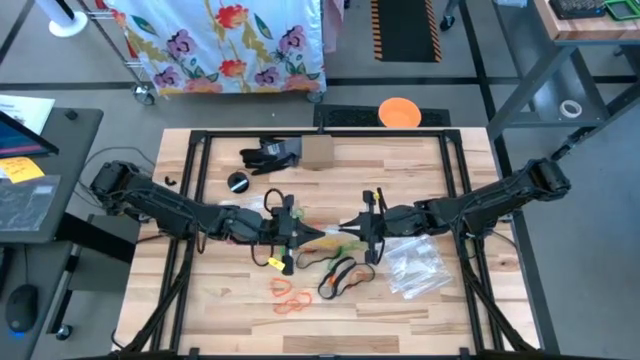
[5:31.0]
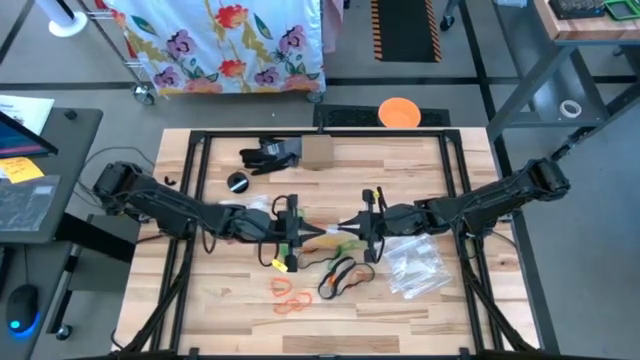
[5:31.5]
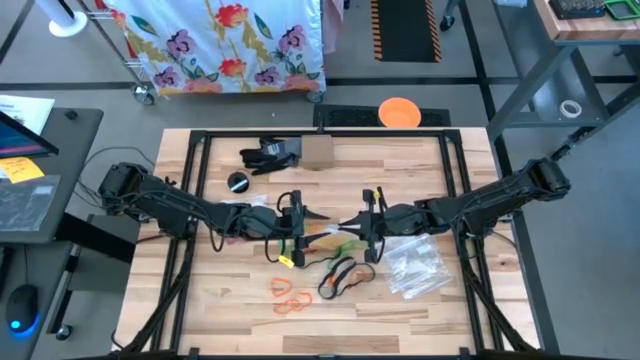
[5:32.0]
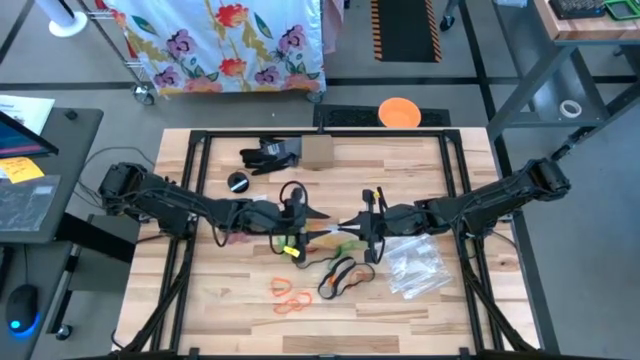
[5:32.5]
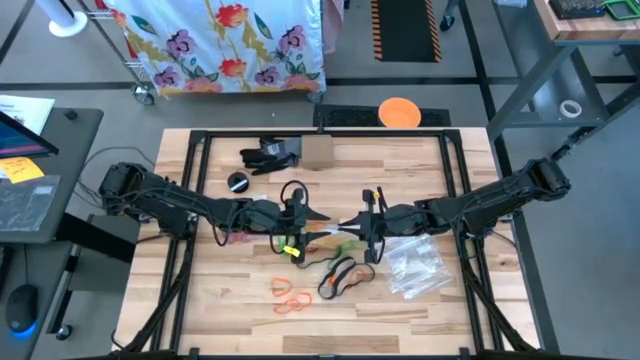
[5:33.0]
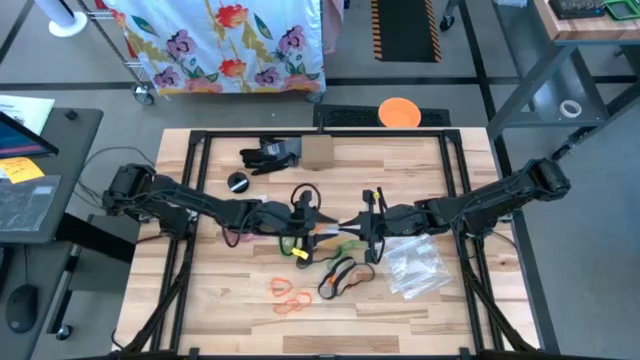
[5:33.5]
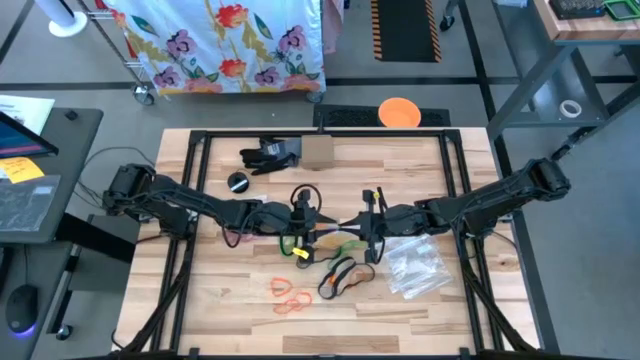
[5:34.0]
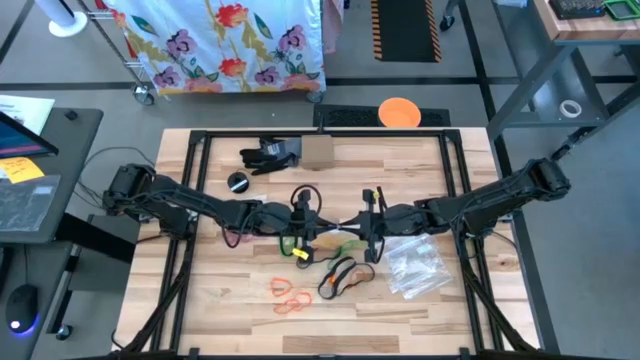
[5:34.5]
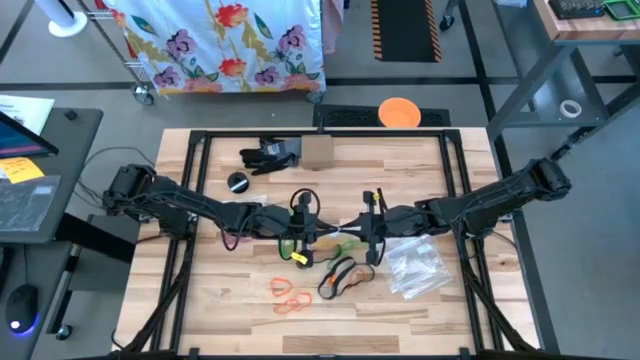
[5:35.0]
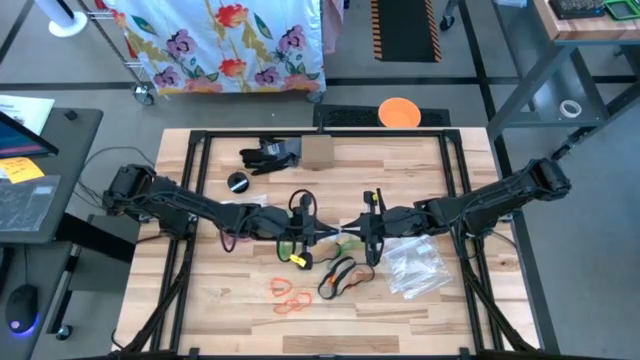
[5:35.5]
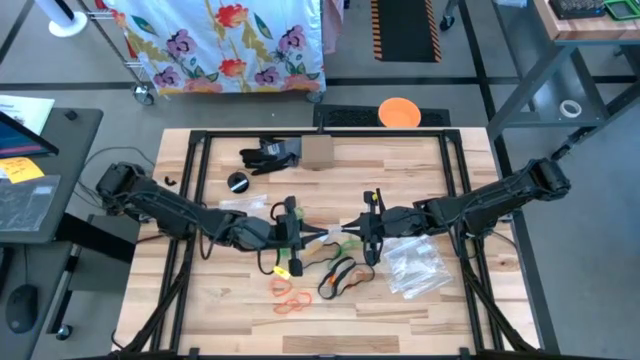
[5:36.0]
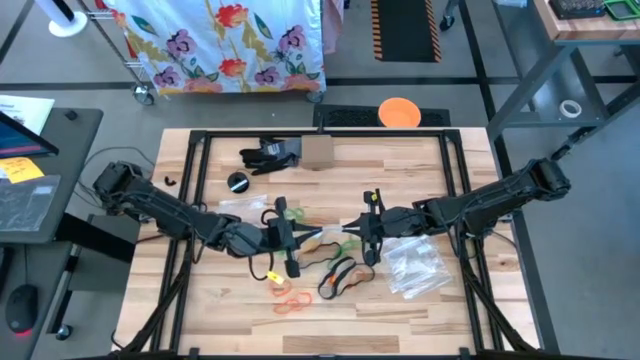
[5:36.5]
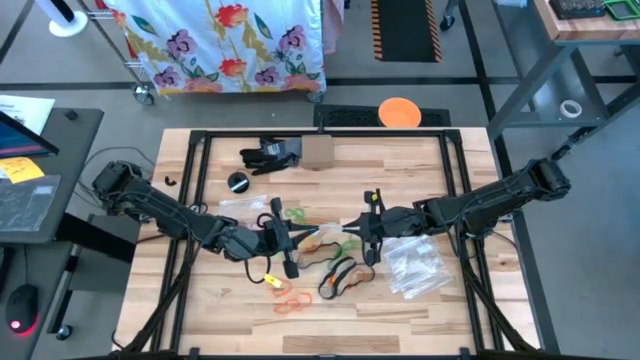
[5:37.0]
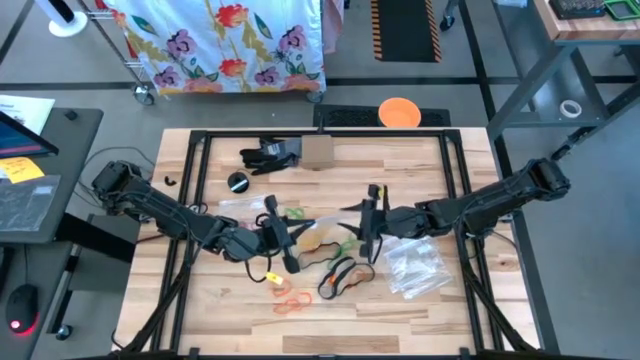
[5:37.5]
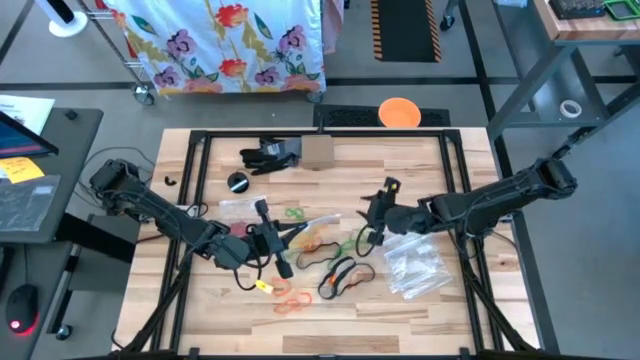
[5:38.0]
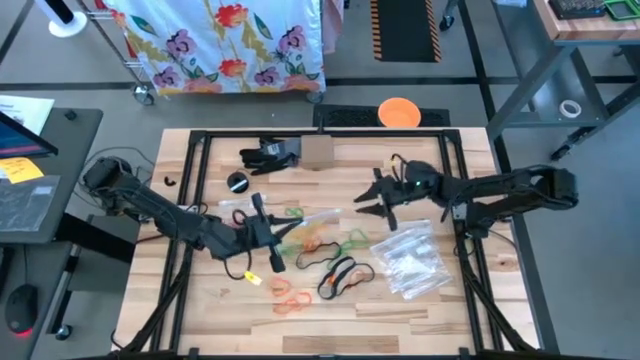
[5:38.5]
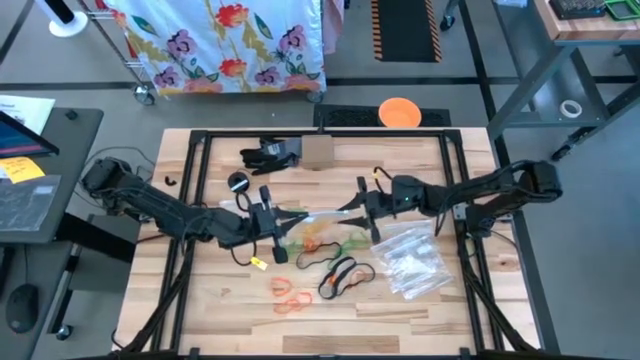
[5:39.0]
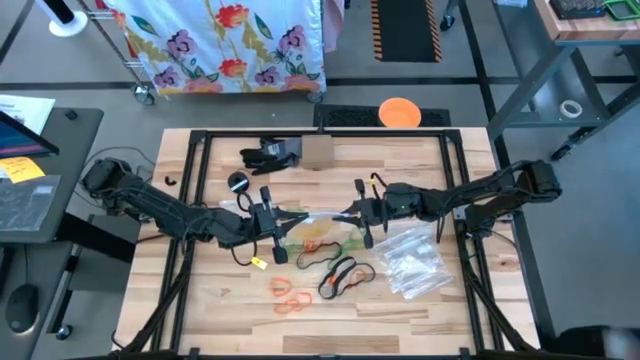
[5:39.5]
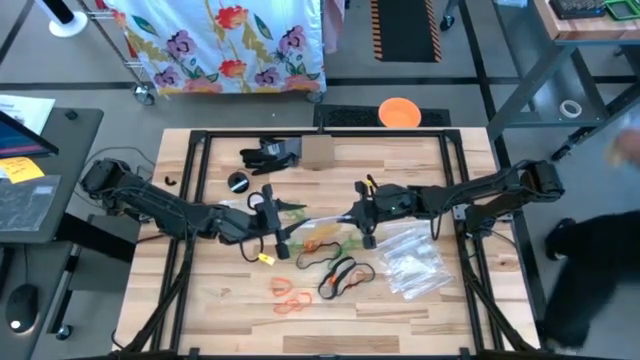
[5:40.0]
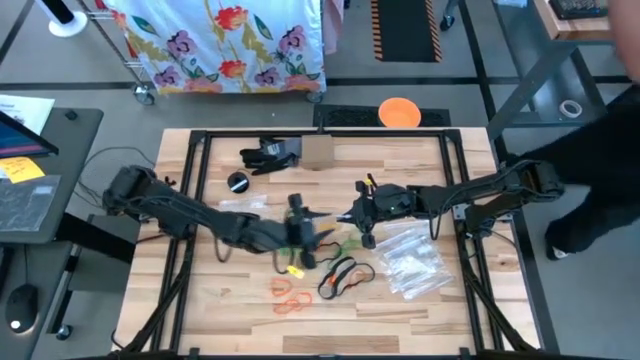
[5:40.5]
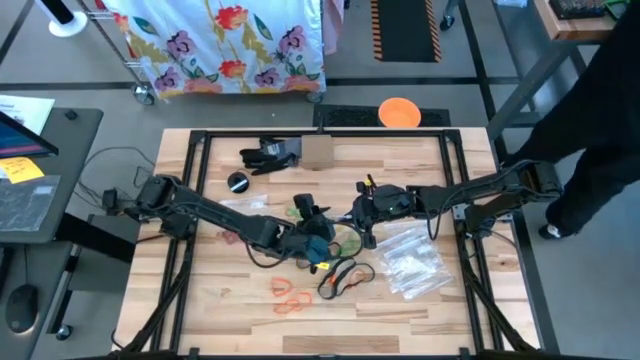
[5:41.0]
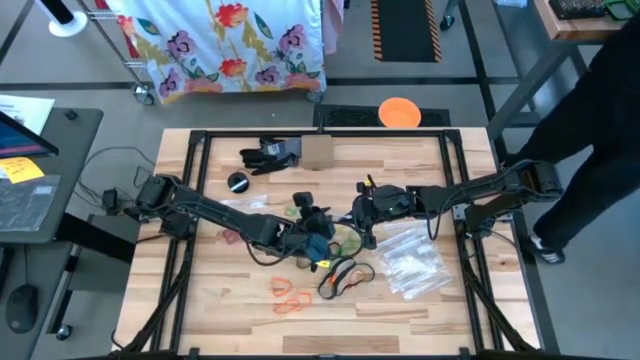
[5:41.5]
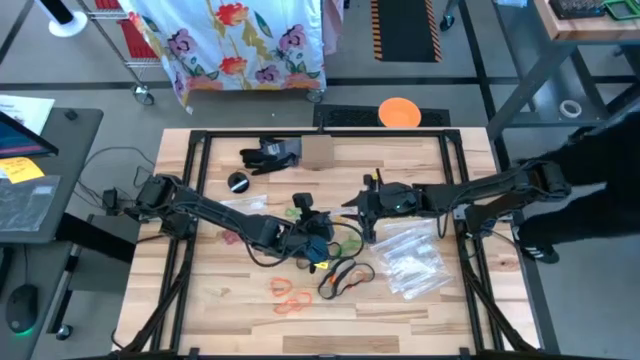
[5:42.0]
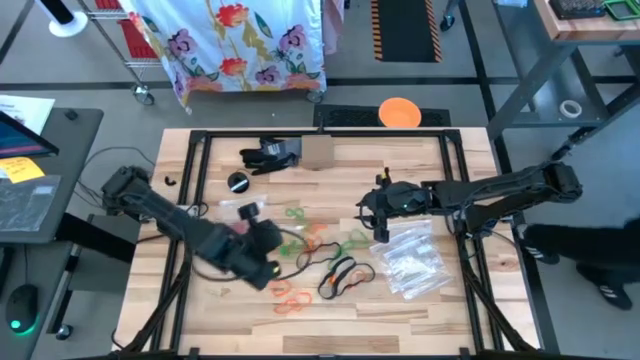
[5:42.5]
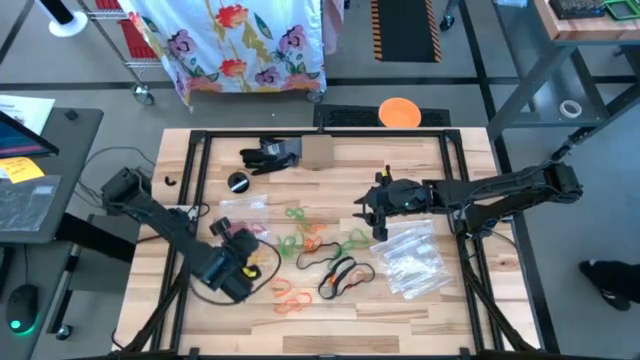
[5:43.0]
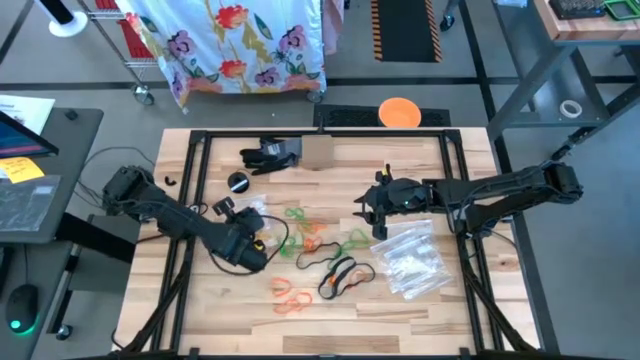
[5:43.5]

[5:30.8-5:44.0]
Task: Sort rubber bands
Close the transparent zip bag

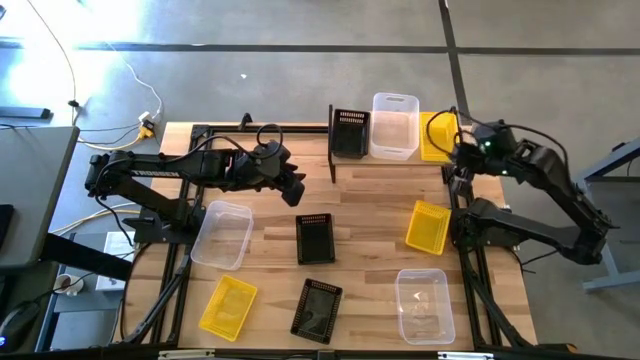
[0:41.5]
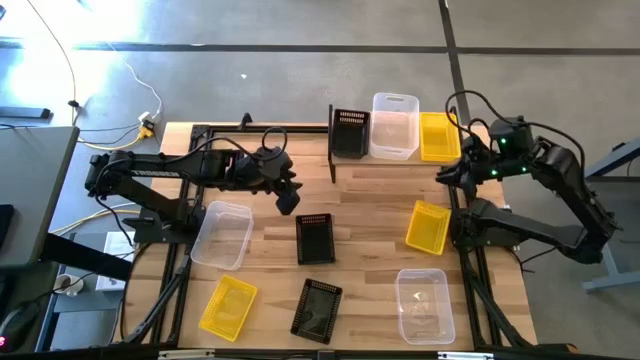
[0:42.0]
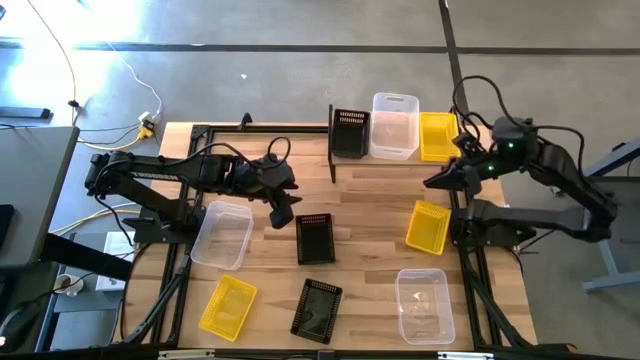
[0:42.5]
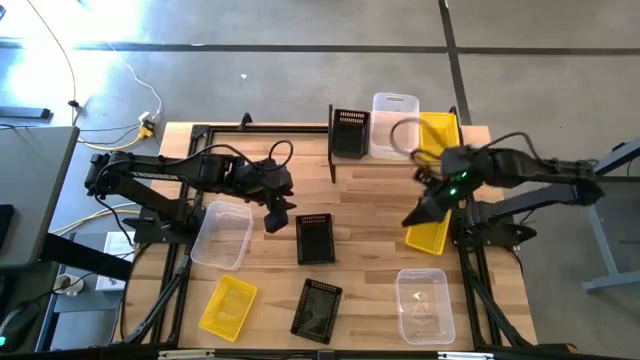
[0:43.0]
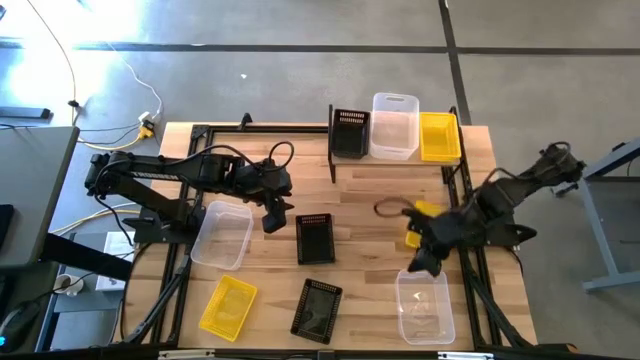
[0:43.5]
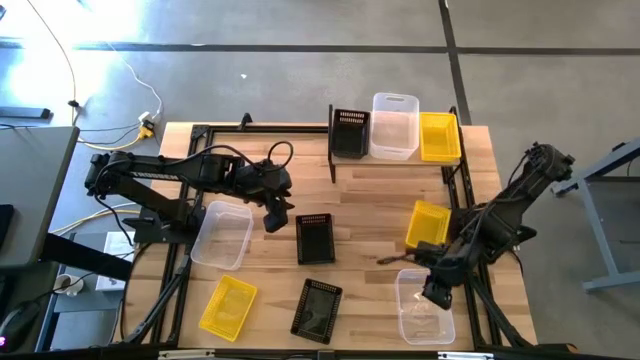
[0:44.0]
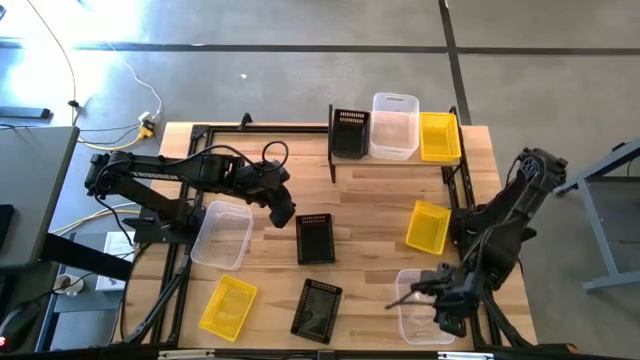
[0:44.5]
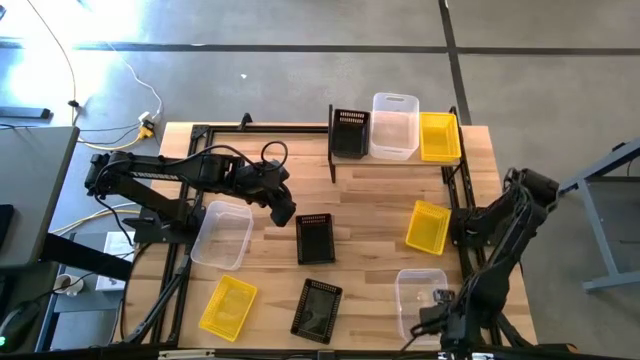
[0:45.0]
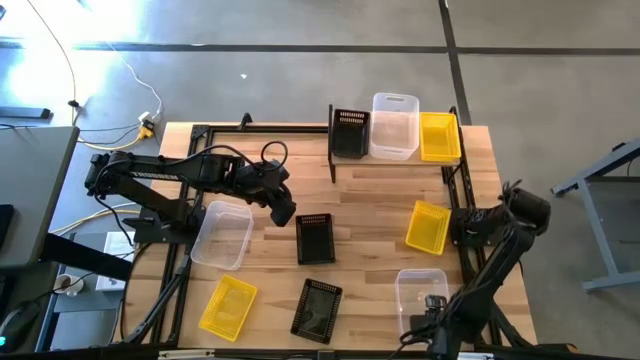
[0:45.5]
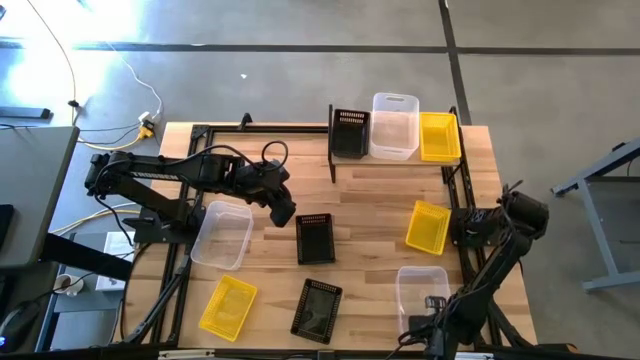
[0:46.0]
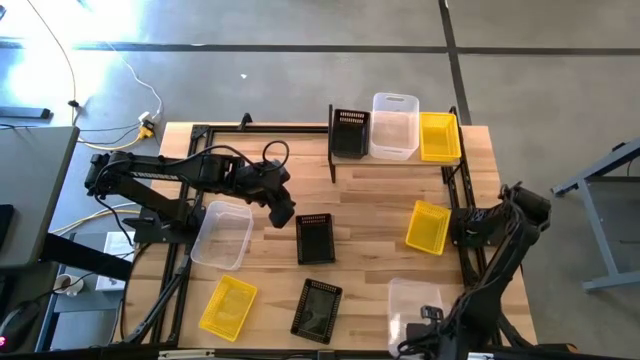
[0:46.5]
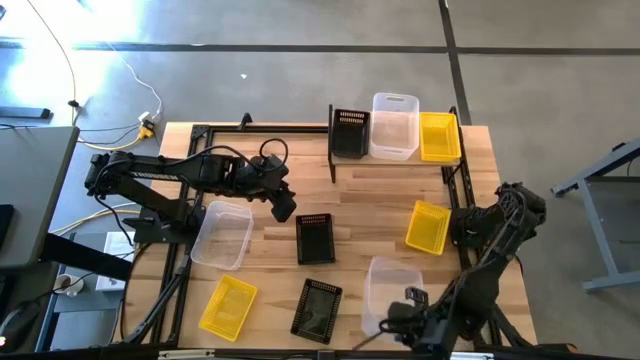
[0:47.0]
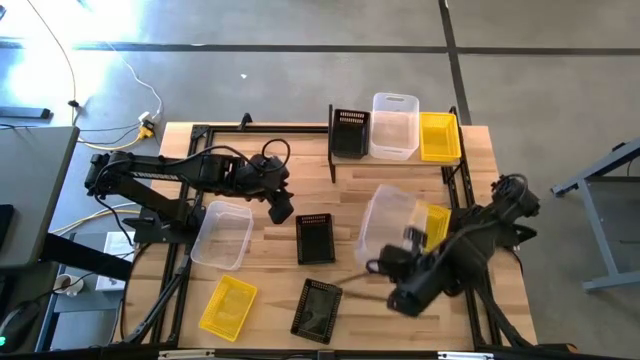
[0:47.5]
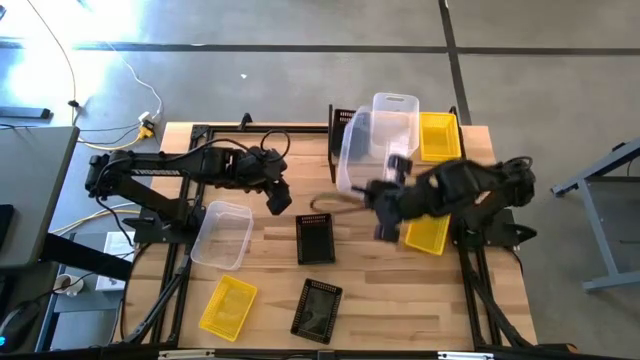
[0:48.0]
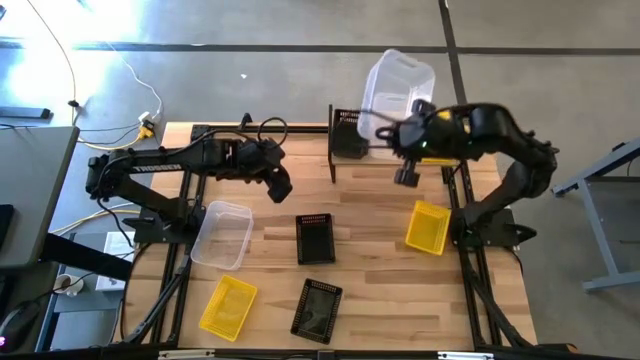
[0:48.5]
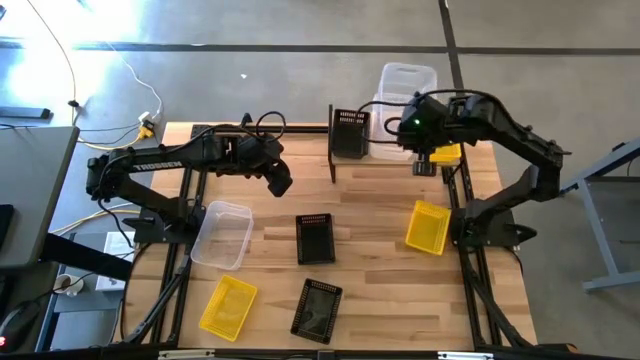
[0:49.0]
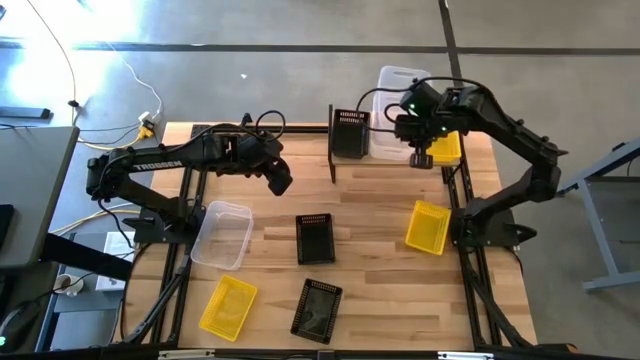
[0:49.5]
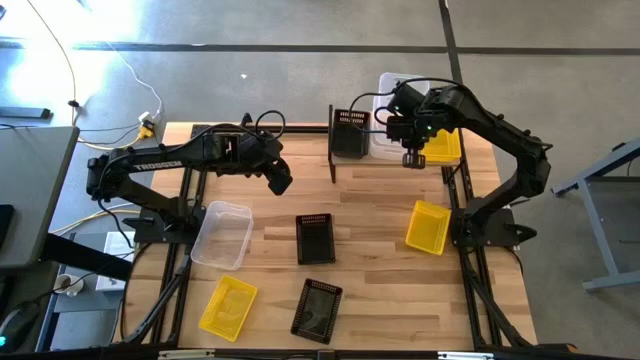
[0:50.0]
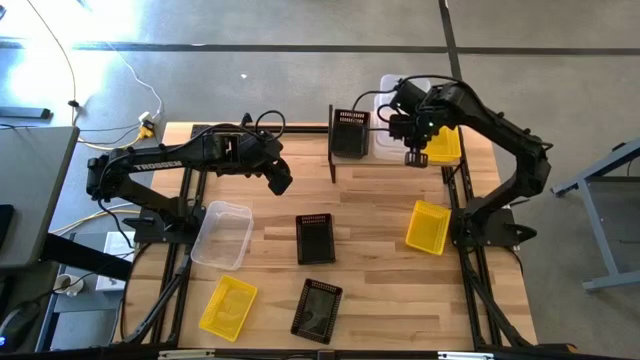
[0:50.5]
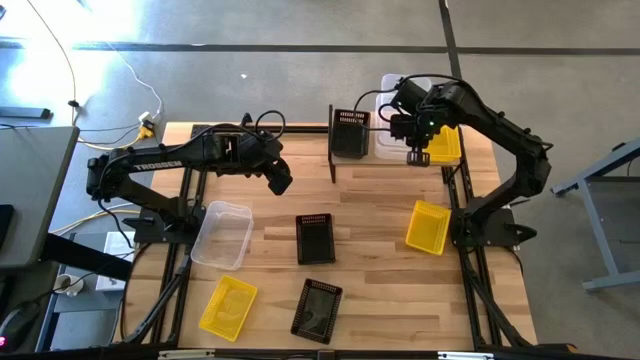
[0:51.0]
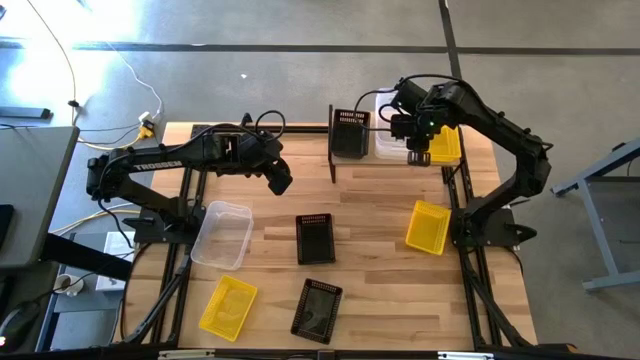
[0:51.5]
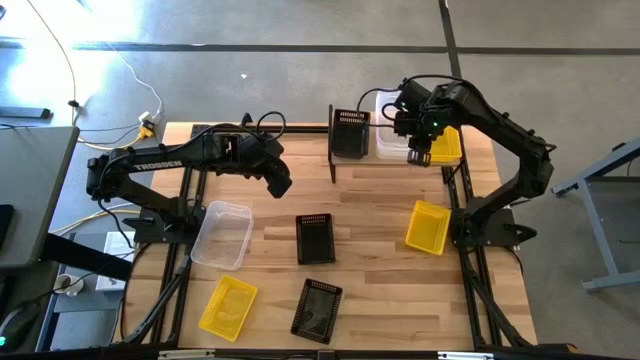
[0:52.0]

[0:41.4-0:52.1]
Task: Stack baskets on shelf by color
Stack the right transparent bin on top of the transparent bin on the shelf
